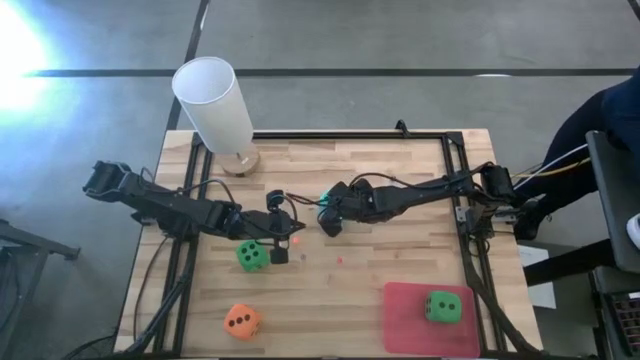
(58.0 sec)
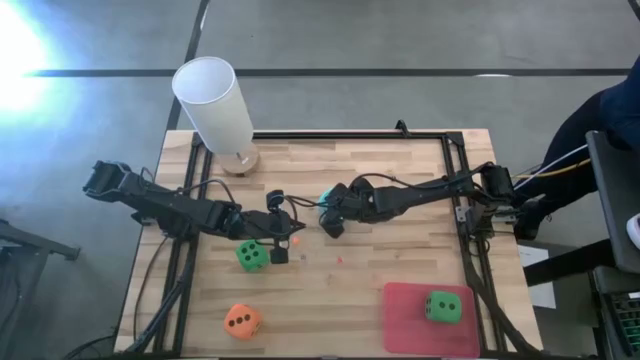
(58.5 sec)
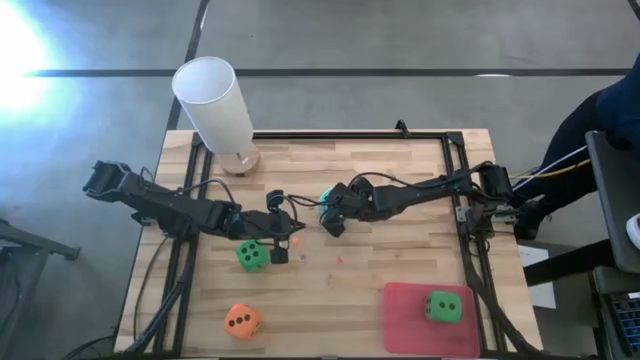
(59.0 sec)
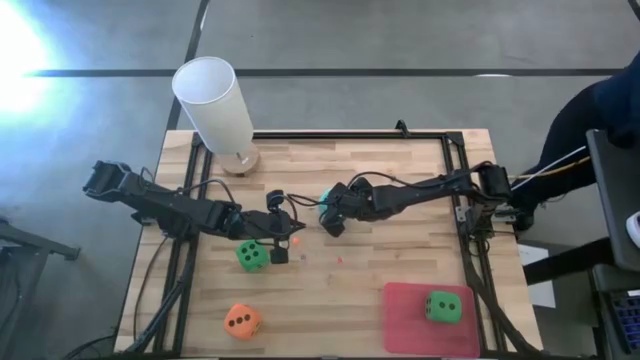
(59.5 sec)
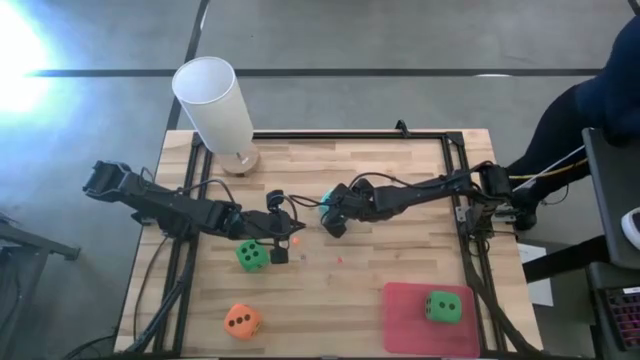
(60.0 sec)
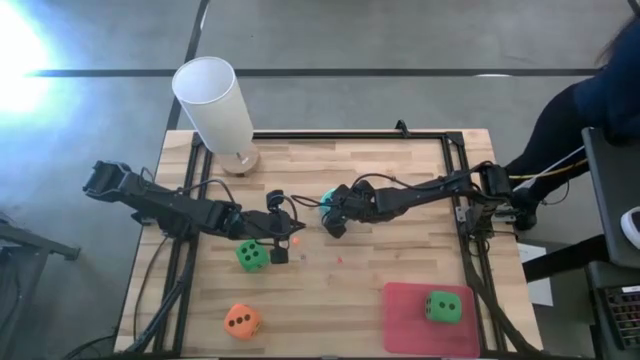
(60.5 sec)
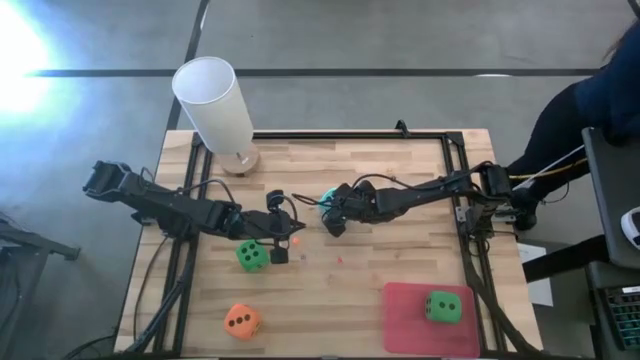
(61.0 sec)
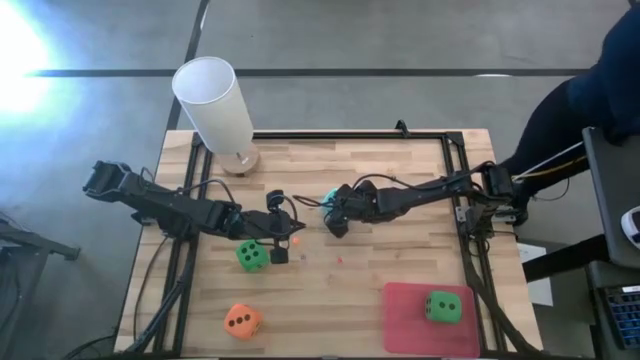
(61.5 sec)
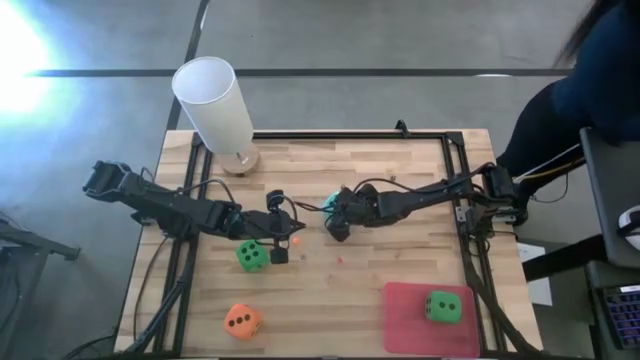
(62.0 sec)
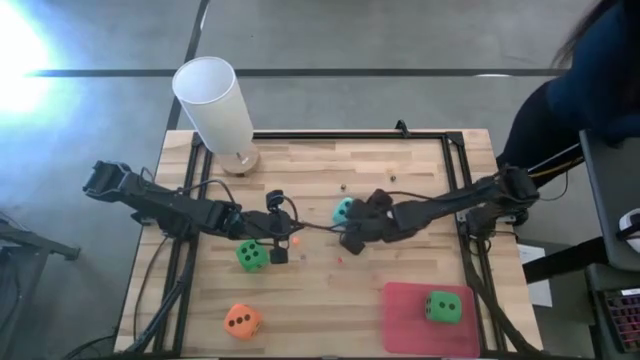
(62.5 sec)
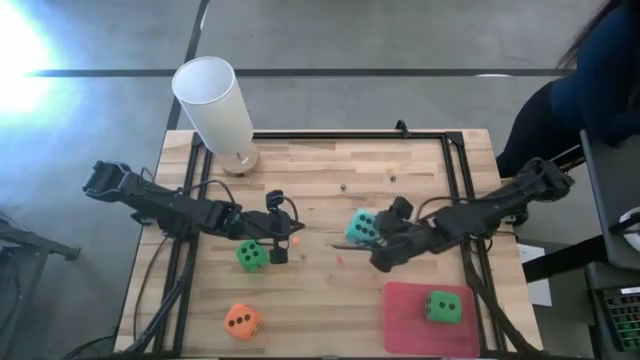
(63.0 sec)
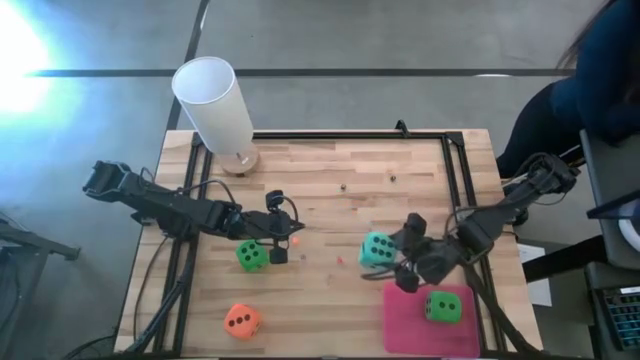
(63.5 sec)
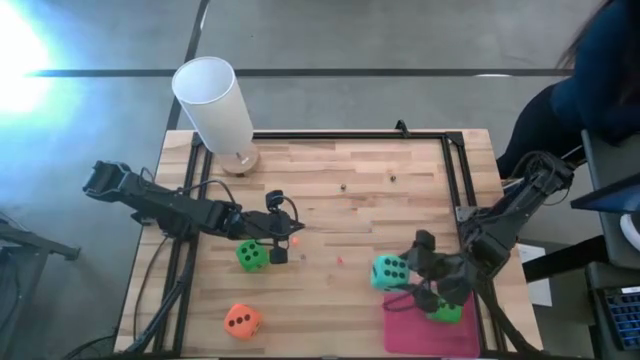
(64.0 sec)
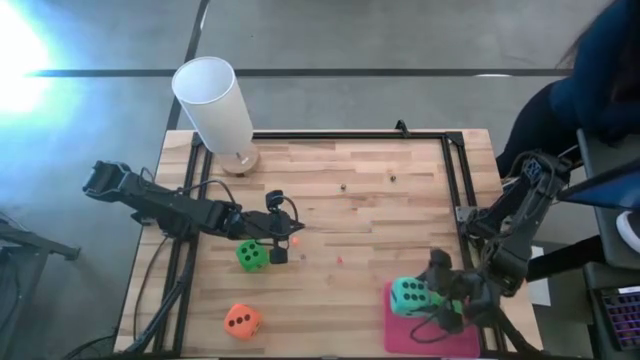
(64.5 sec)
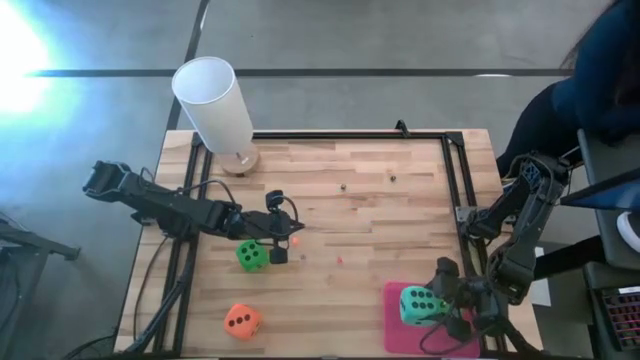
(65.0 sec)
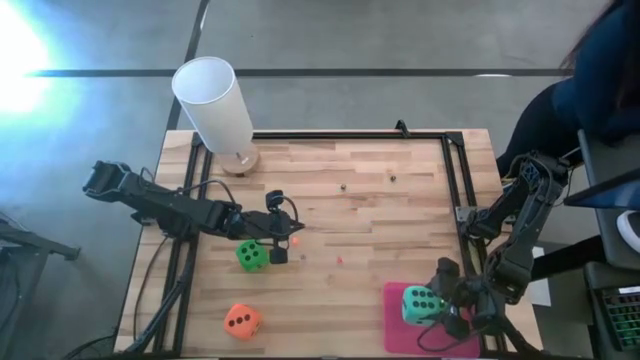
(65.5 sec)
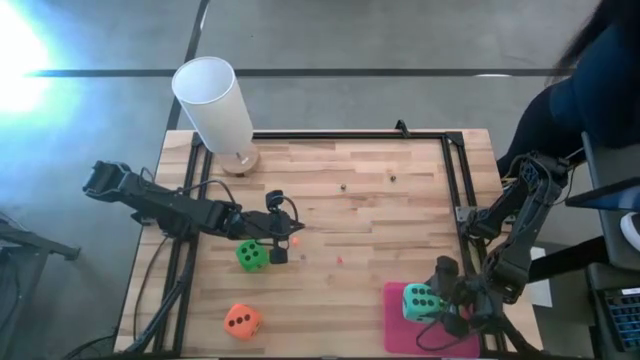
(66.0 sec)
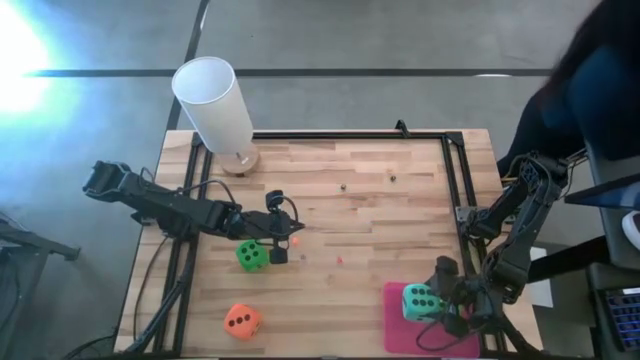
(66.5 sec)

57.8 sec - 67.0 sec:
Task: Pick & Place Dice
Put the large blue die into the bin
